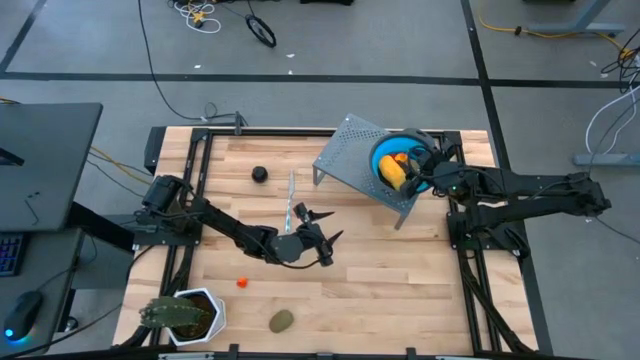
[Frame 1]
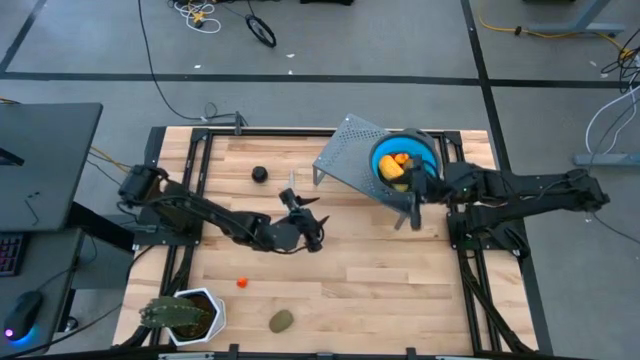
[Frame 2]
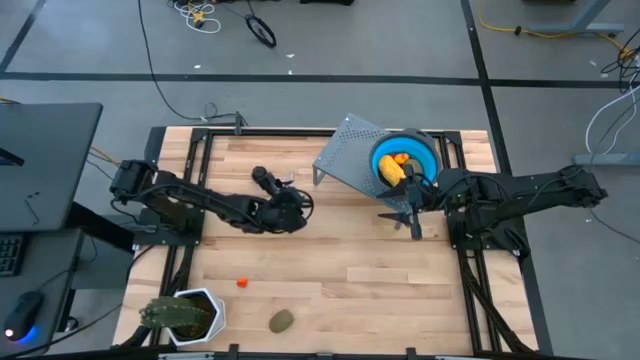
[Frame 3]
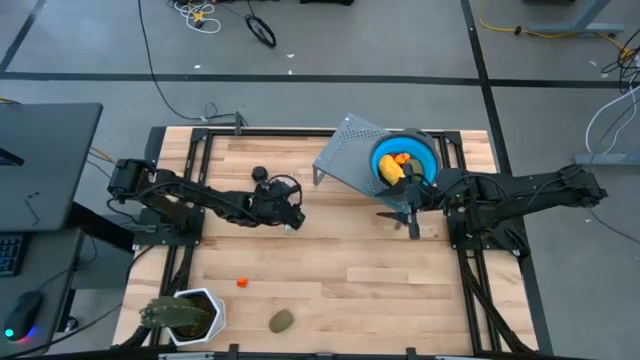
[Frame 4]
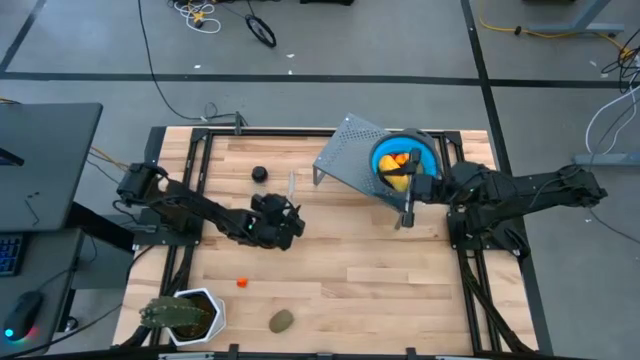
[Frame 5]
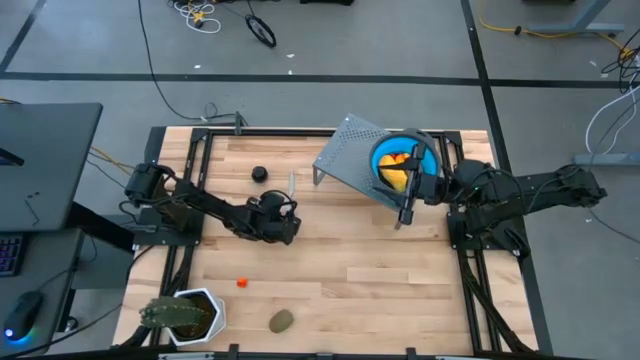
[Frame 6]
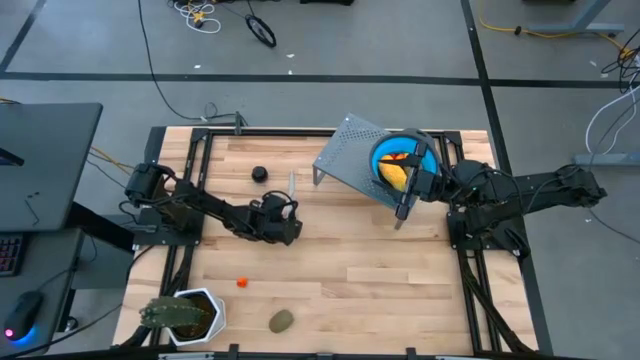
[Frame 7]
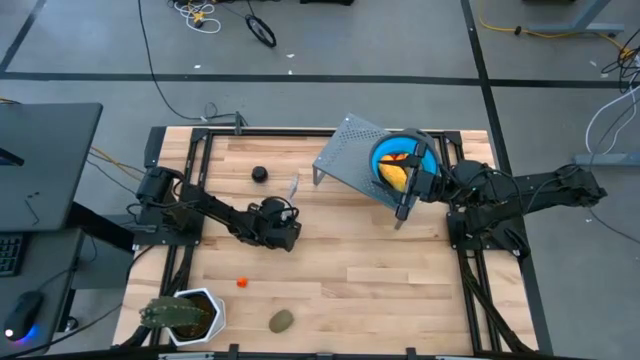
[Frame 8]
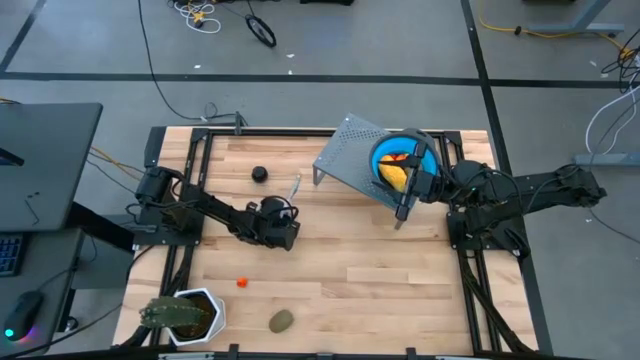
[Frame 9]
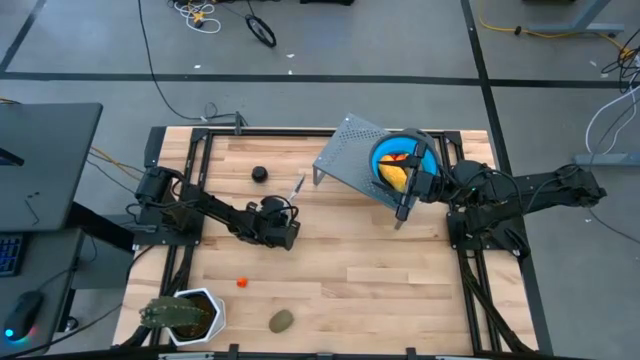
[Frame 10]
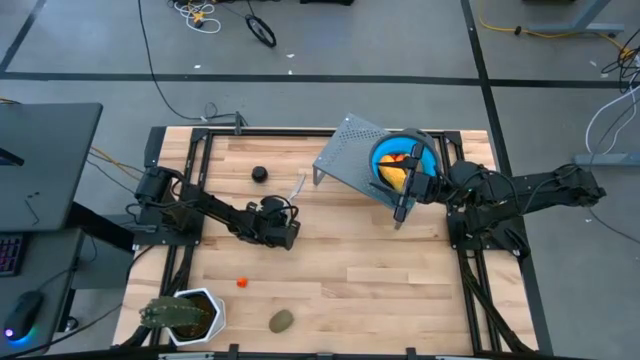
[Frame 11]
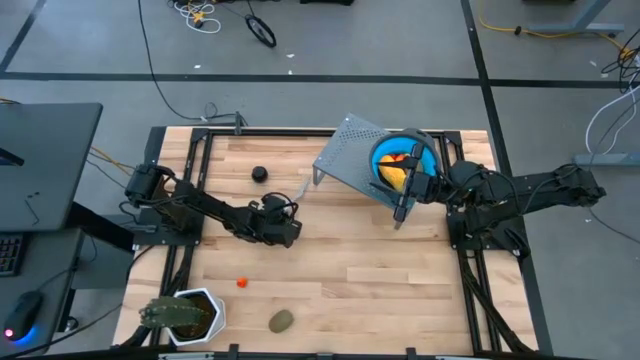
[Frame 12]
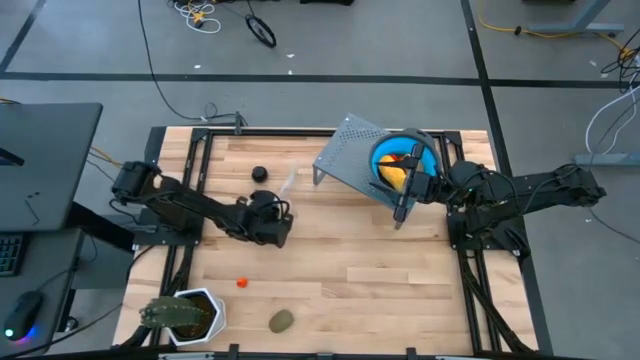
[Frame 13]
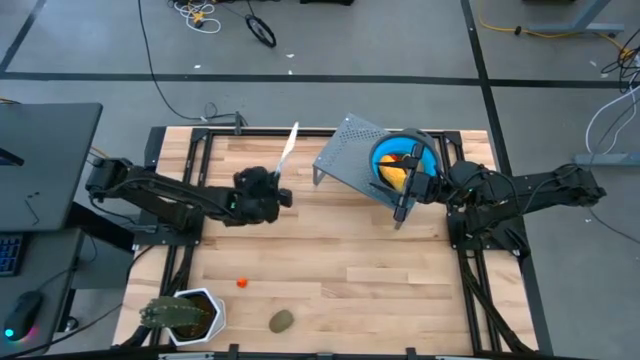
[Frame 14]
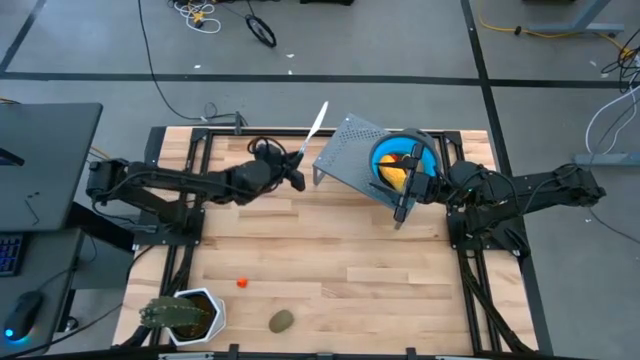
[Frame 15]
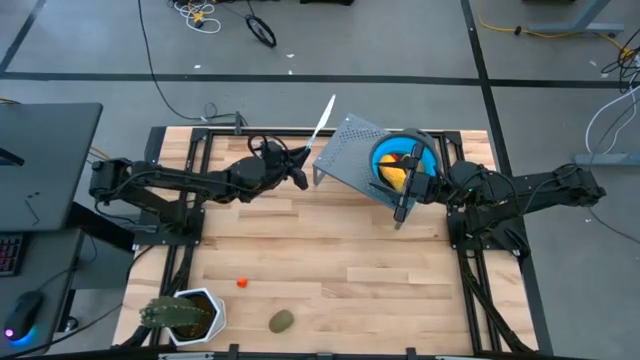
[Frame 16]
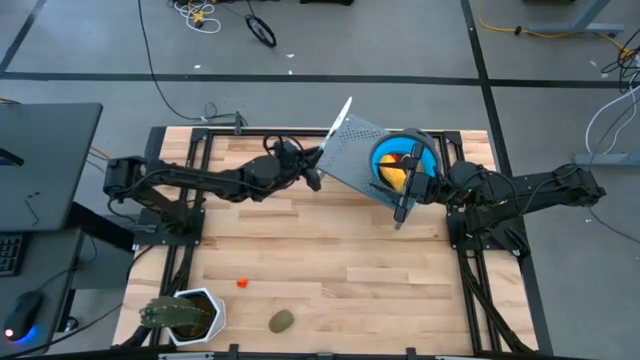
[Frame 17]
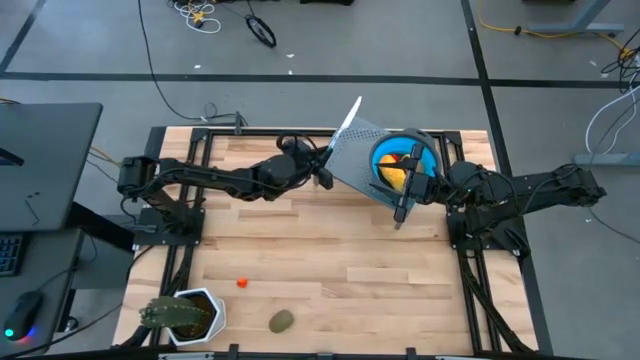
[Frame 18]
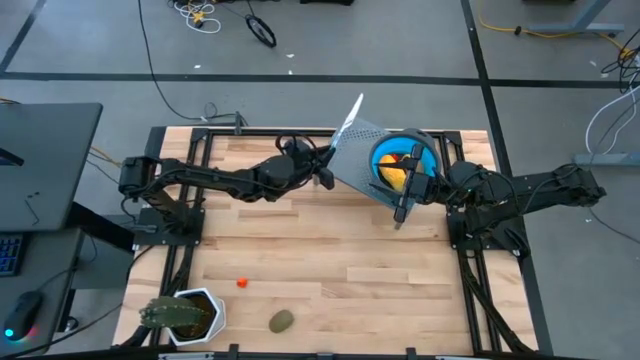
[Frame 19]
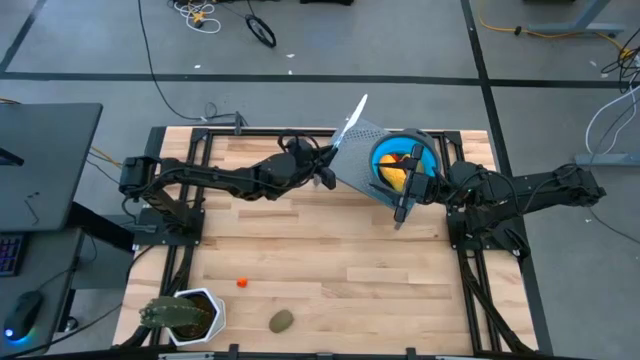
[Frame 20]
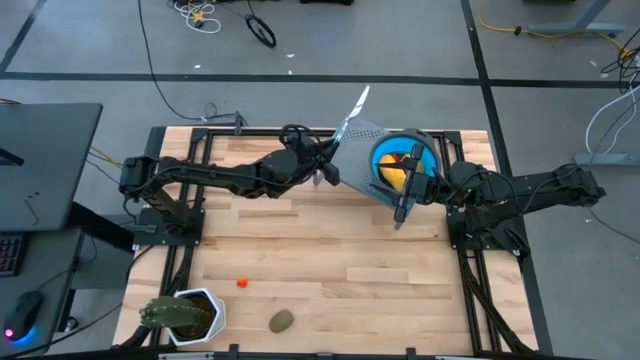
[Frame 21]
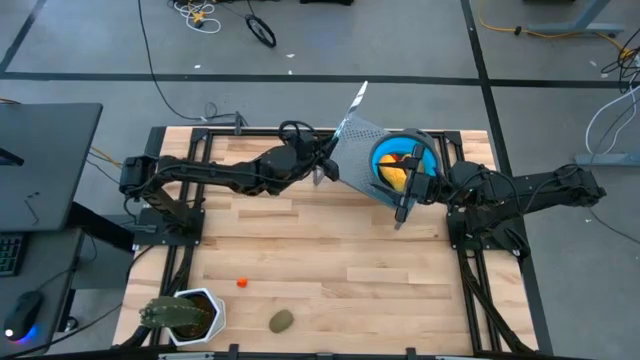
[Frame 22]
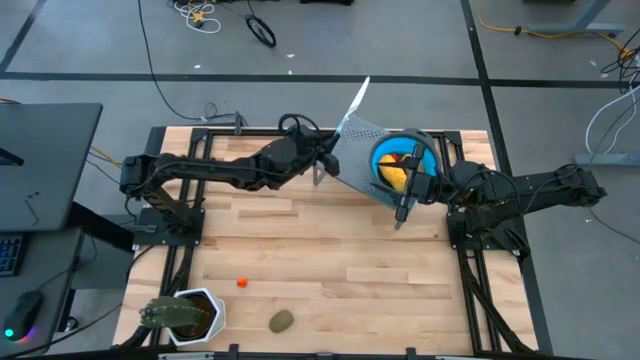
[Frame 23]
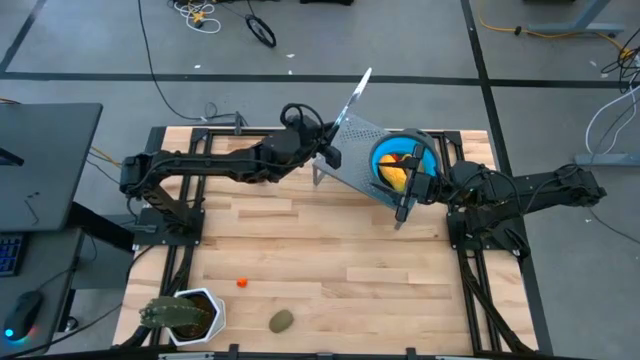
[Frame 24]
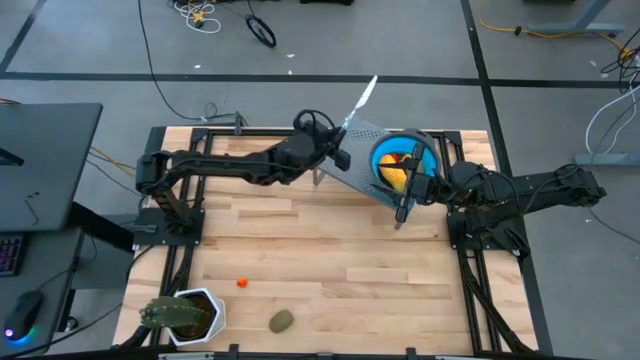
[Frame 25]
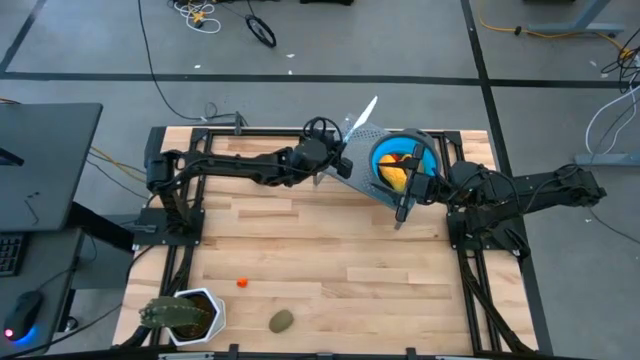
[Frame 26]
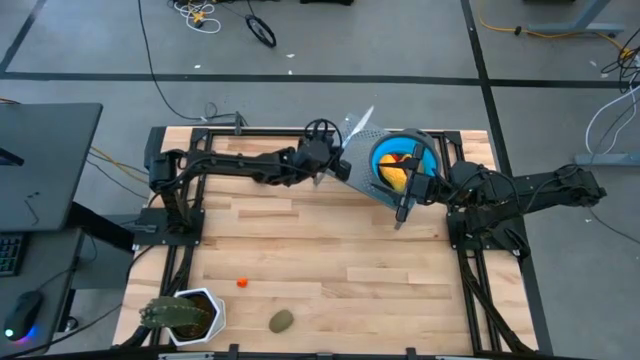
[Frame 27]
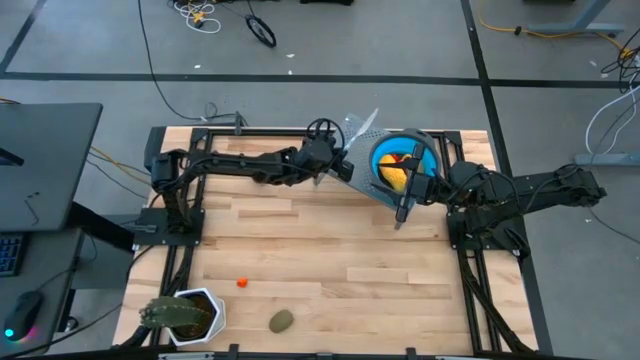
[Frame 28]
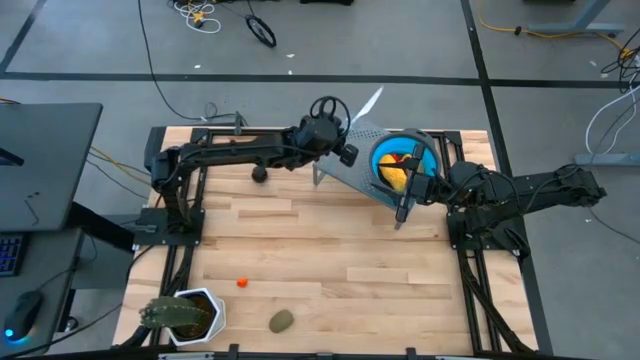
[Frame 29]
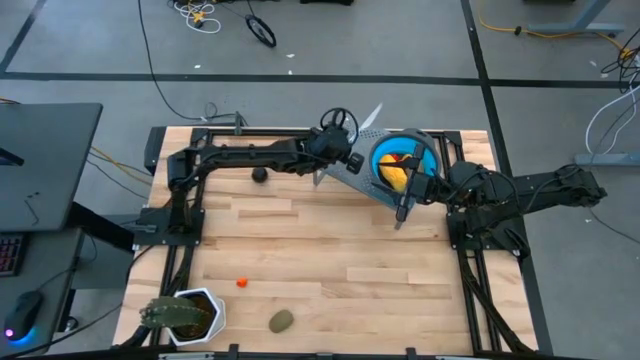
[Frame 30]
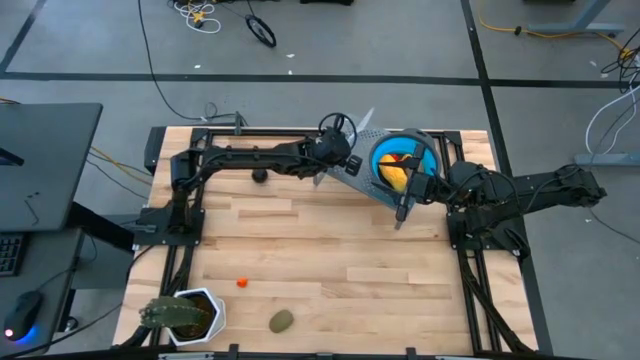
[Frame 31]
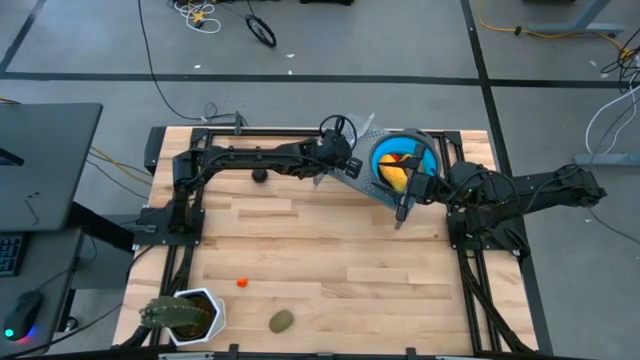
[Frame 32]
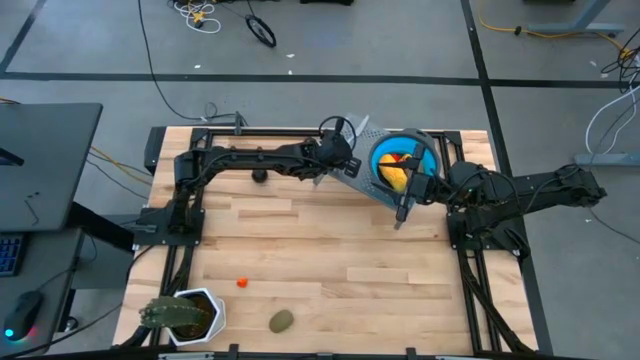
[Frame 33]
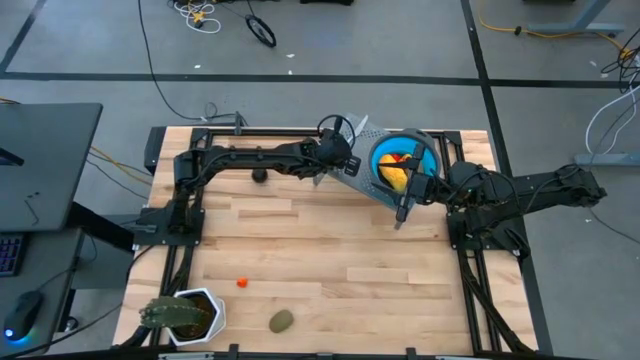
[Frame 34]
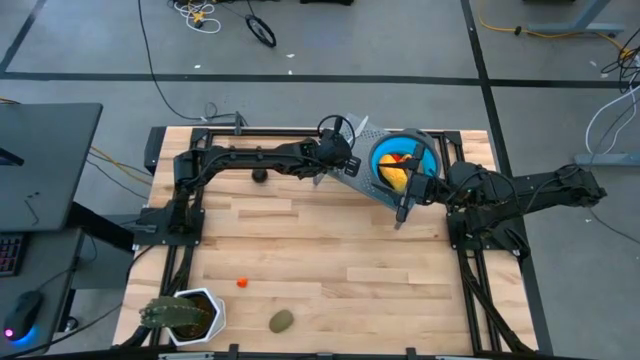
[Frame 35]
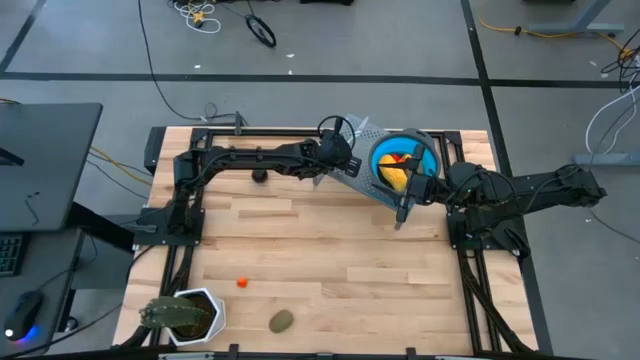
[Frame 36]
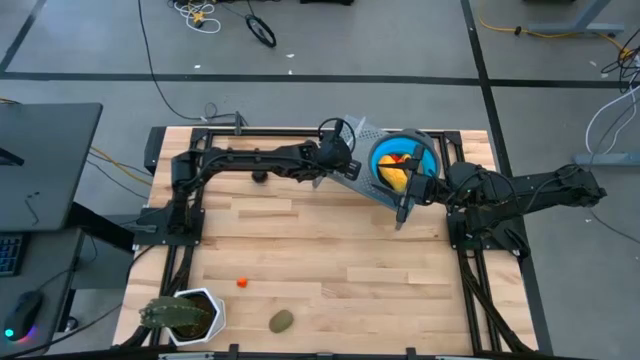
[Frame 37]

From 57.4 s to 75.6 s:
Task: Pick & Place Fruit
Put the blue patterned knife on the shelf

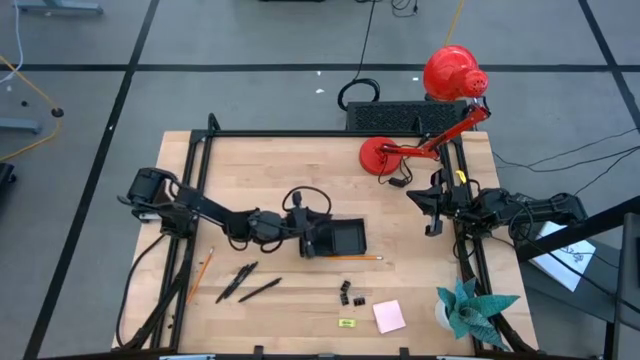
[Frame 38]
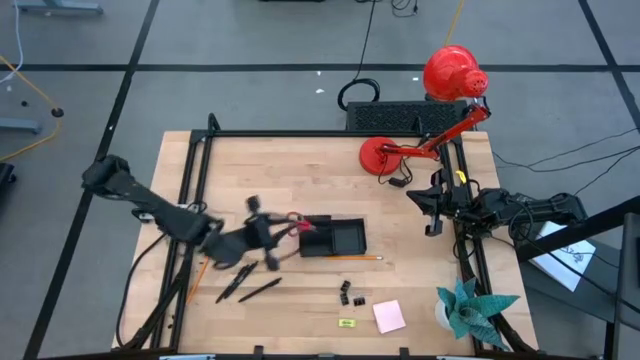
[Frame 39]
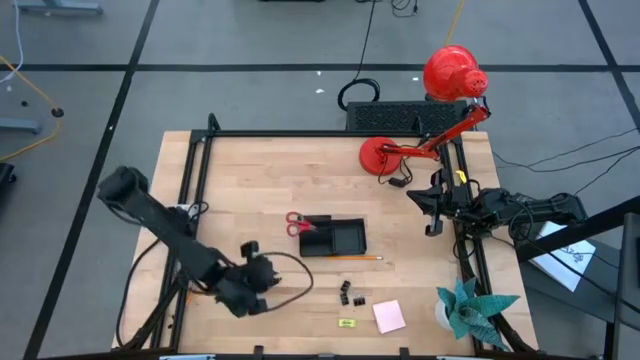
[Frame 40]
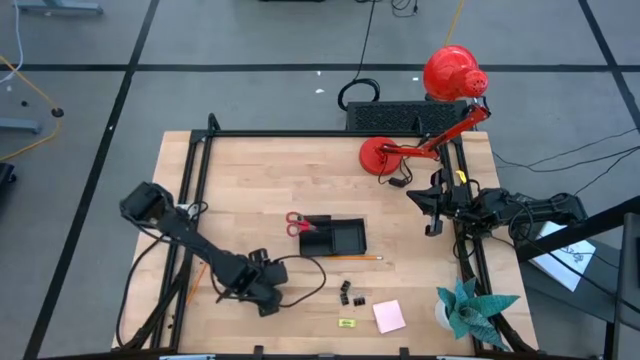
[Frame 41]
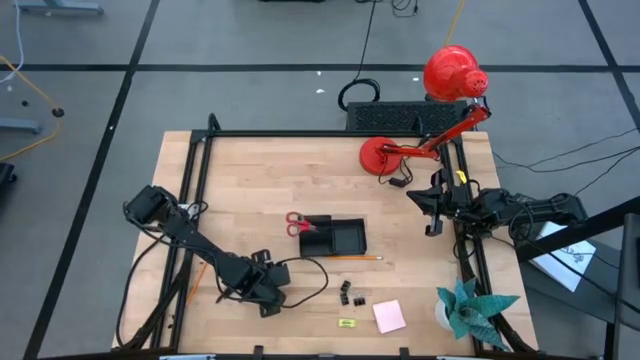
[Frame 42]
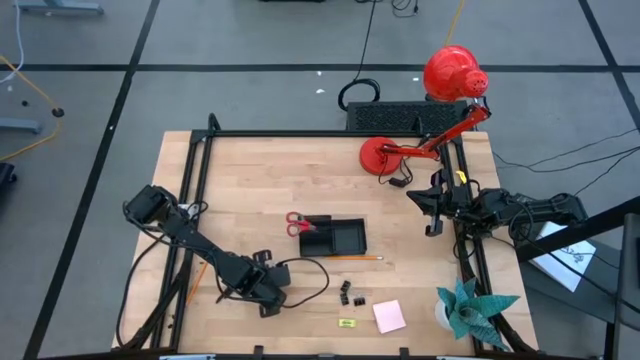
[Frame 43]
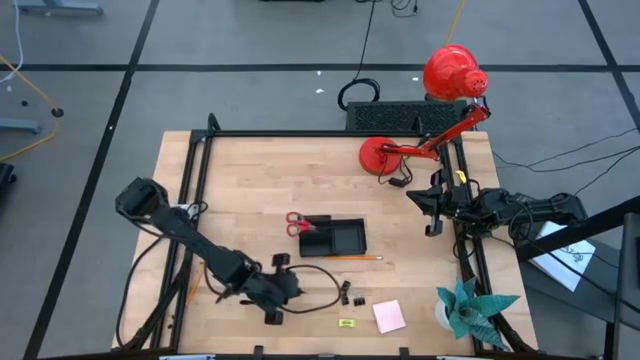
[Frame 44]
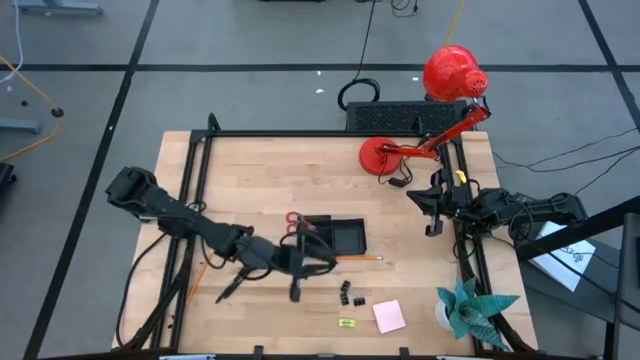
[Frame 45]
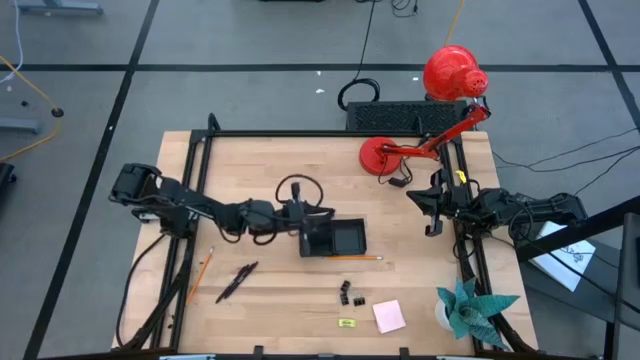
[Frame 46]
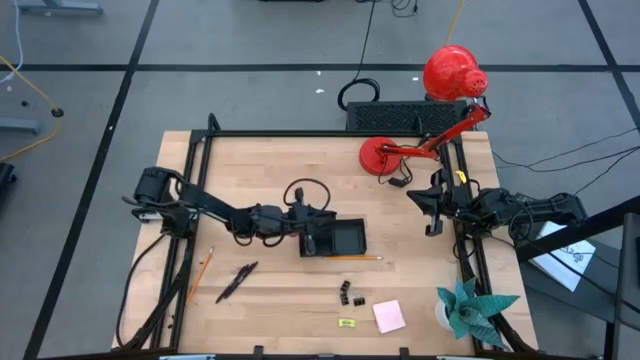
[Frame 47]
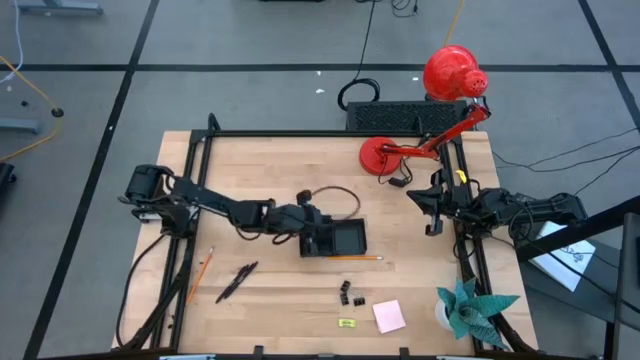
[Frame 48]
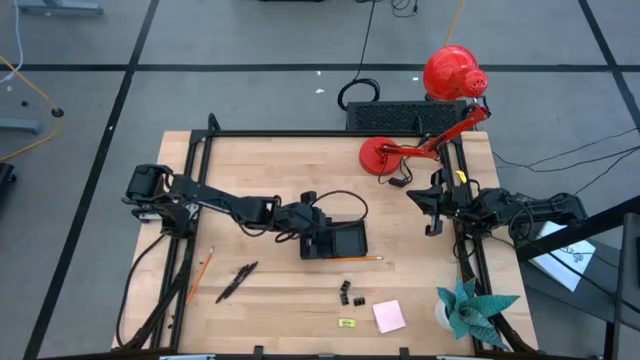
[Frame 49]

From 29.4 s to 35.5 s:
Task: Pick and place office supplies into organizer
Put the right pen into the top left compartment of the desk organizer
